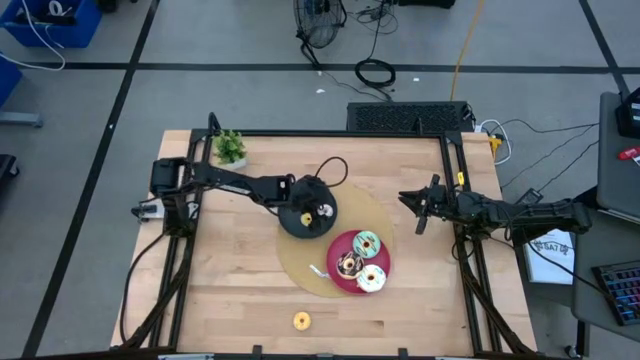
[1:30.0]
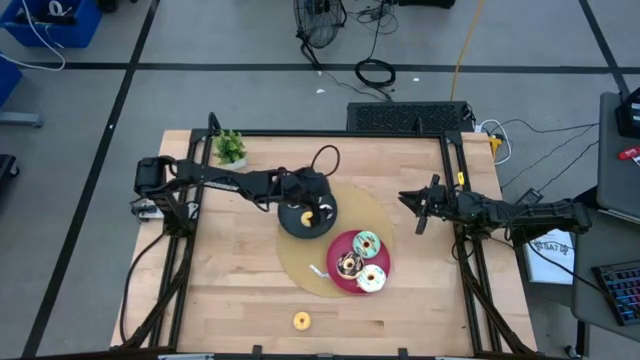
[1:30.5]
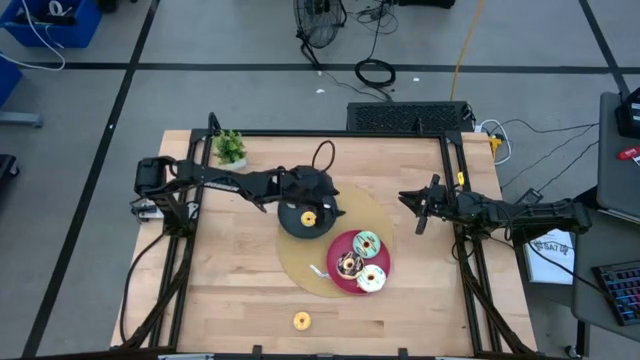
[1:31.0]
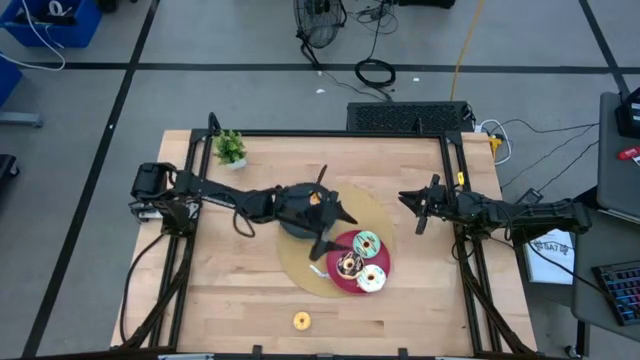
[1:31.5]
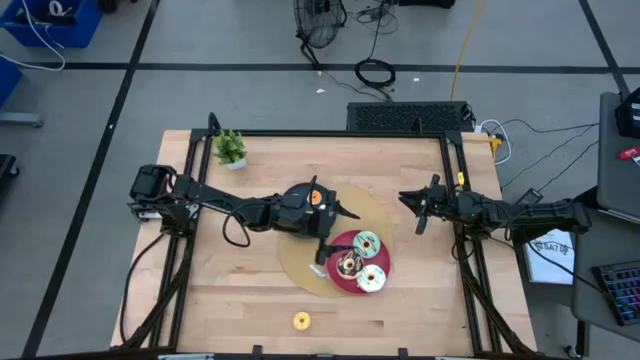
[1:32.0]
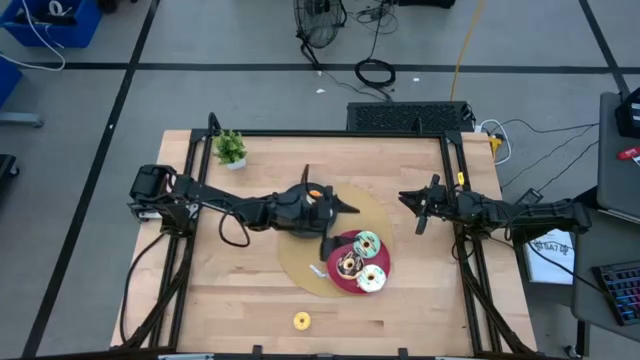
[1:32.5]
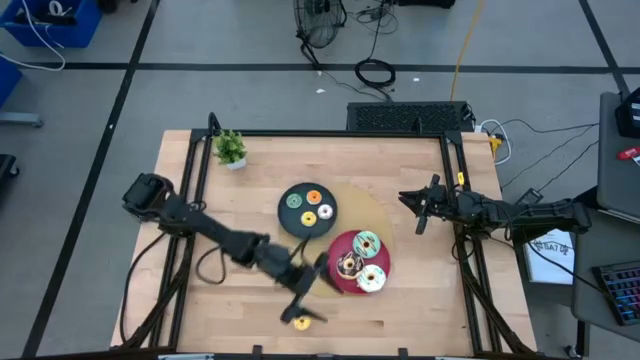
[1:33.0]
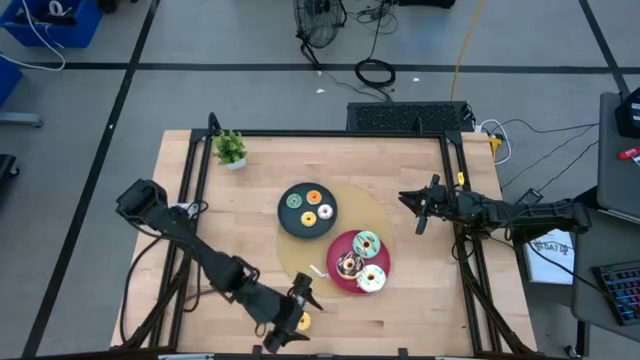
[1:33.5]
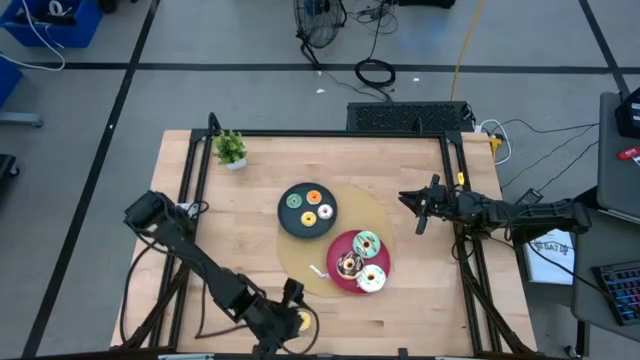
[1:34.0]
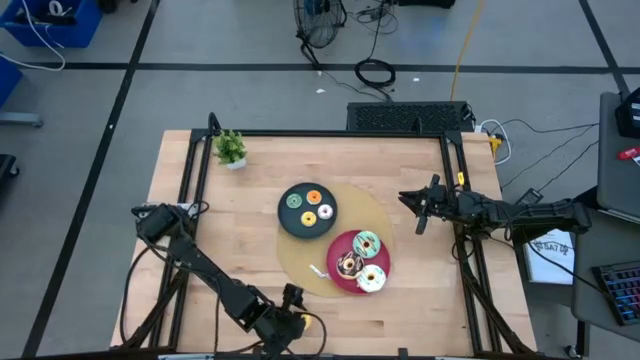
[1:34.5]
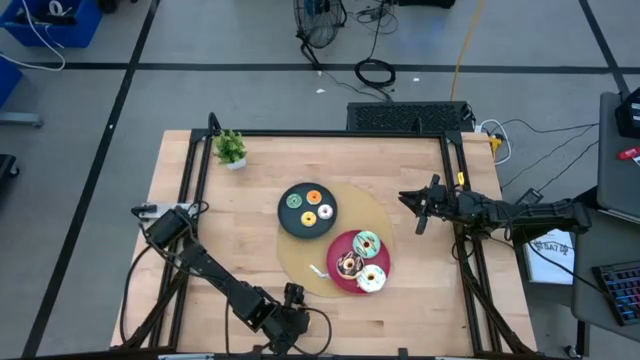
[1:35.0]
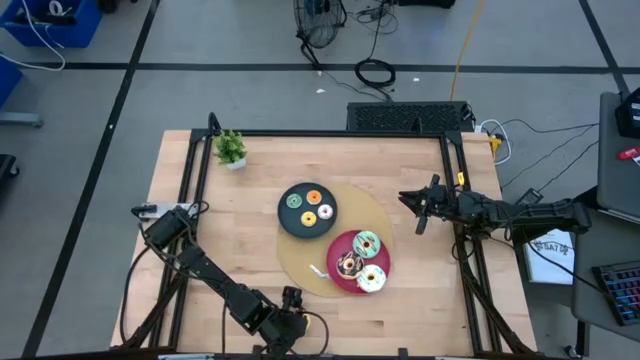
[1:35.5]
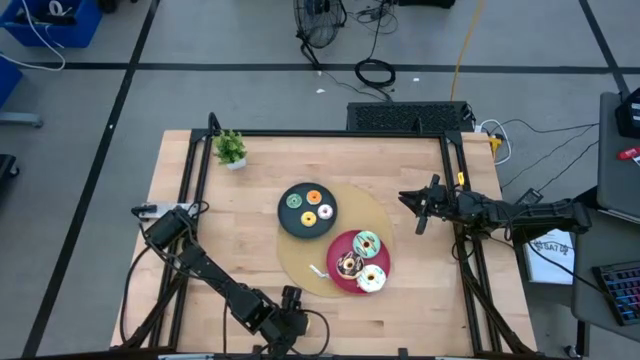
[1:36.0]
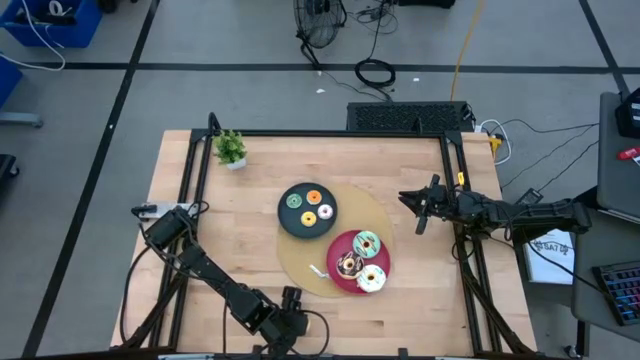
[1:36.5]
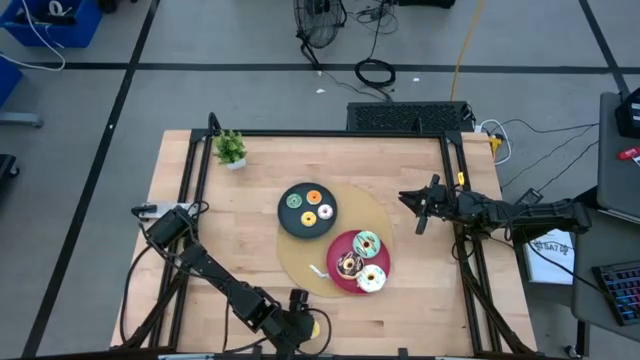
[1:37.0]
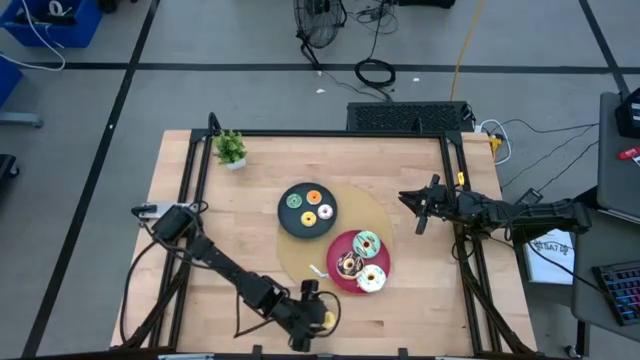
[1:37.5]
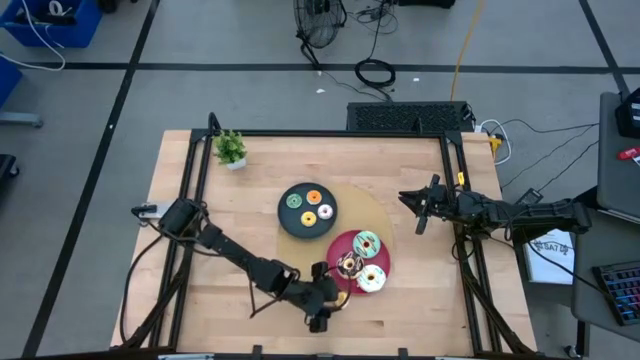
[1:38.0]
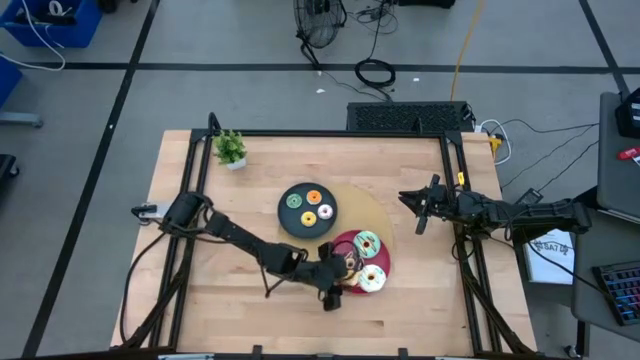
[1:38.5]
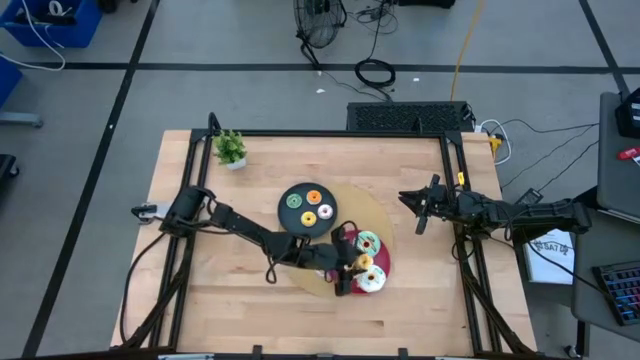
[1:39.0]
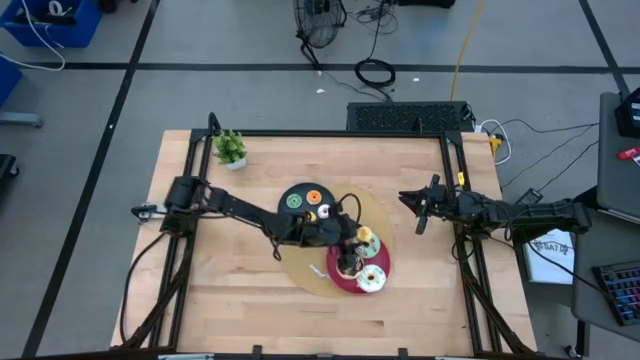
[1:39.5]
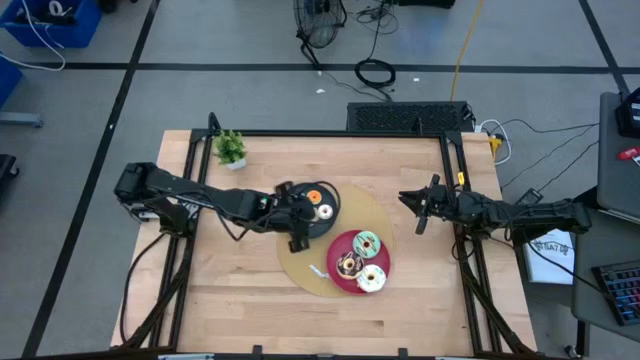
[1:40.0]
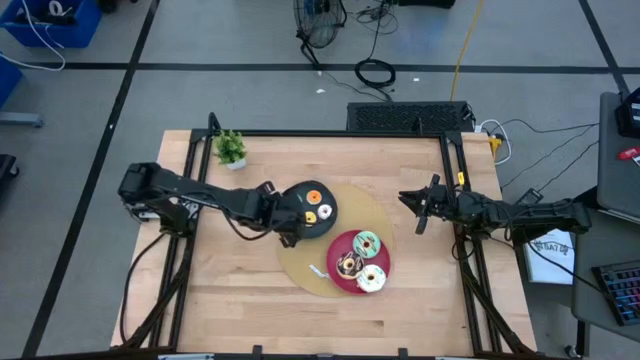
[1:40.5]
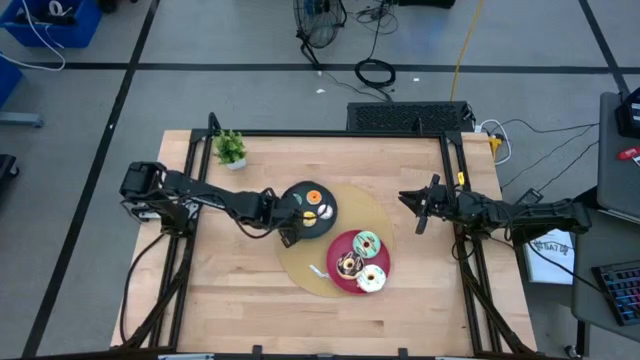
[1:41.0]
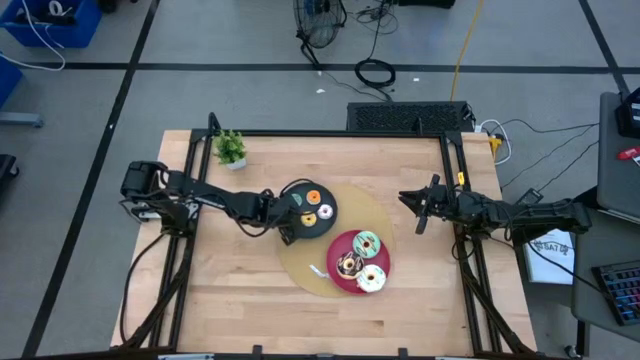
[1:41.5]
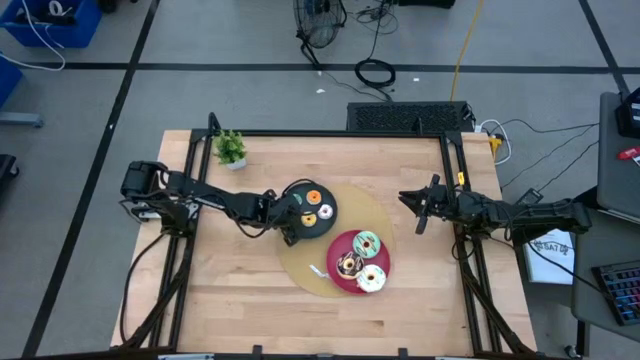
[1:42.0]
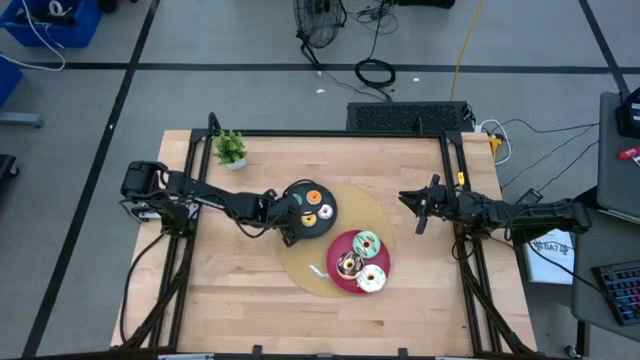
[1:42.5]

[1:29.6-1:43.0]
Task: Pick & Place donuts
Put the small yellow doughnut on the blue plate

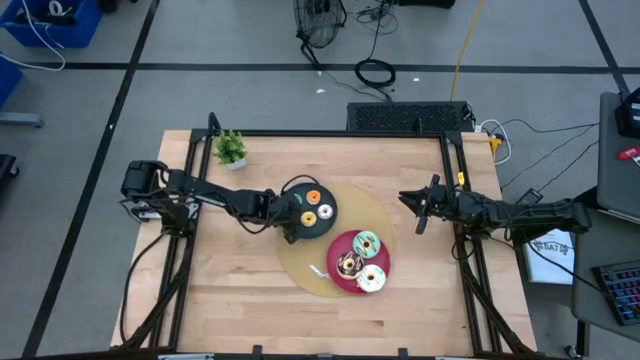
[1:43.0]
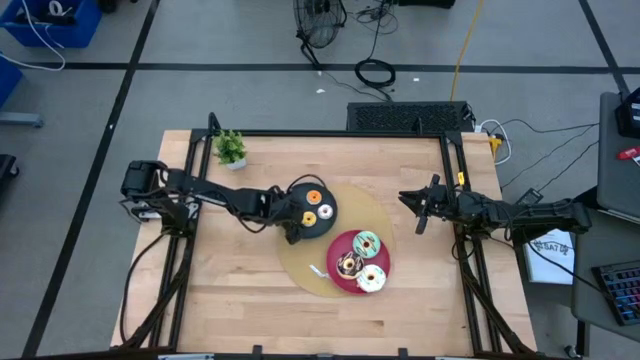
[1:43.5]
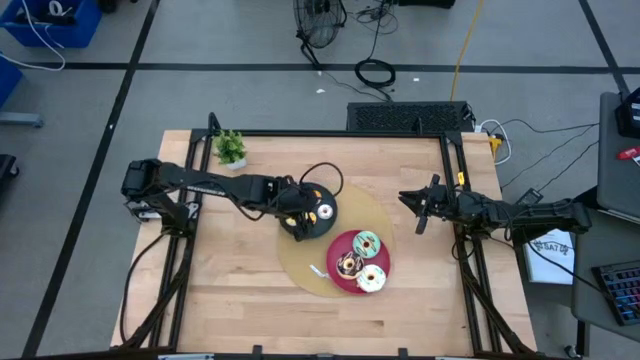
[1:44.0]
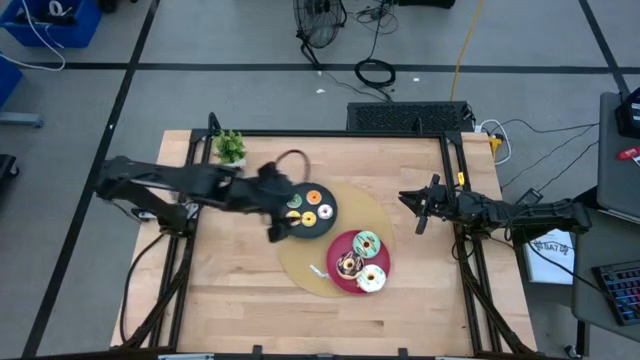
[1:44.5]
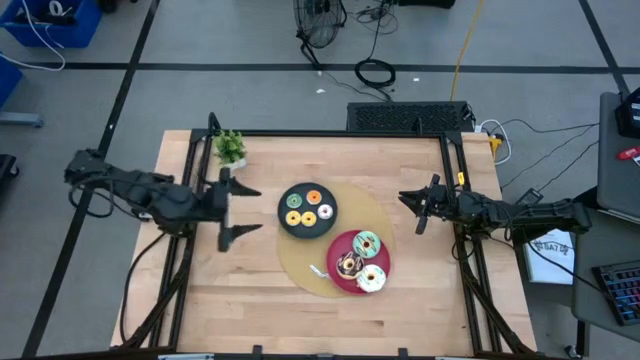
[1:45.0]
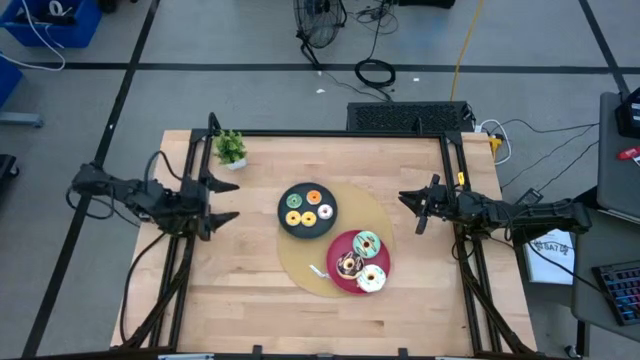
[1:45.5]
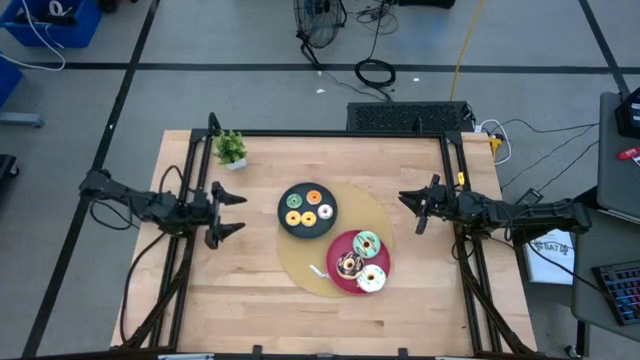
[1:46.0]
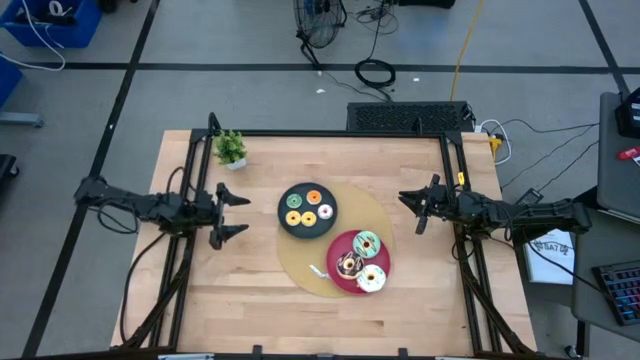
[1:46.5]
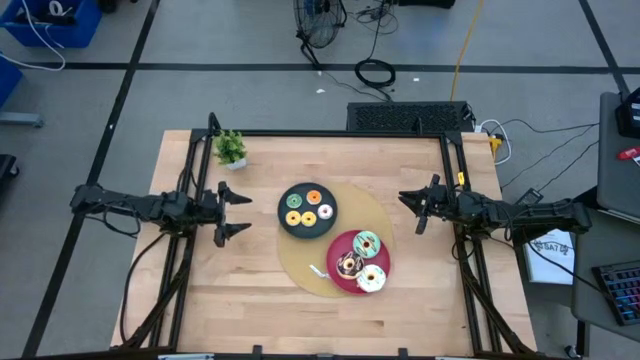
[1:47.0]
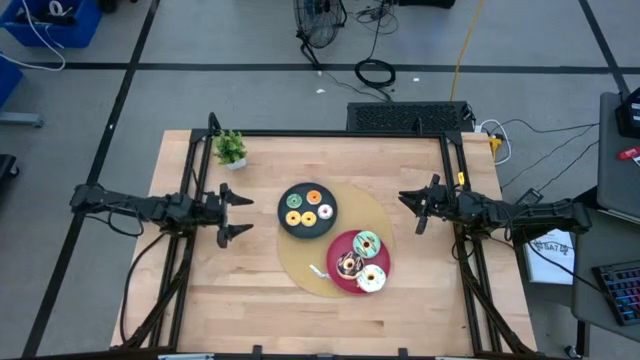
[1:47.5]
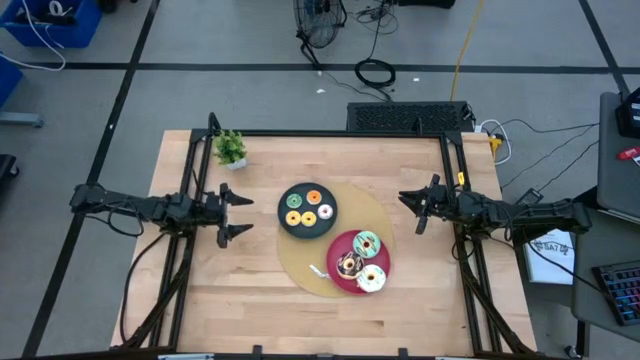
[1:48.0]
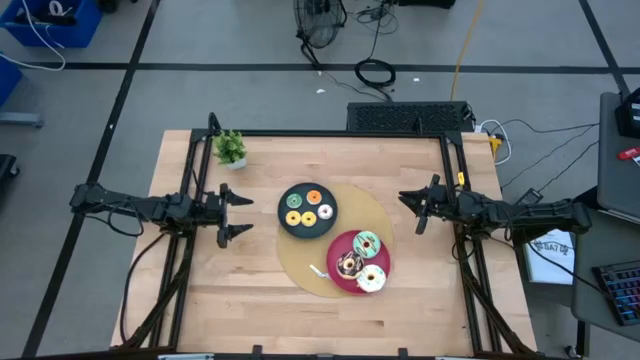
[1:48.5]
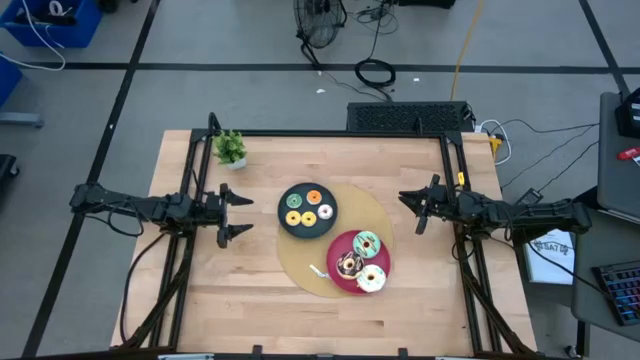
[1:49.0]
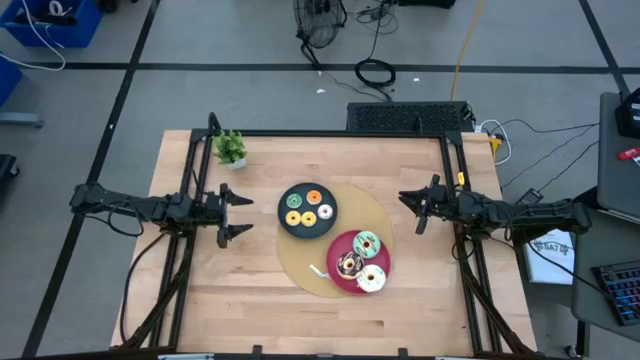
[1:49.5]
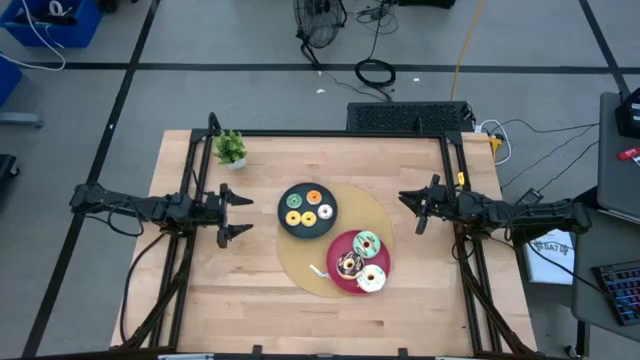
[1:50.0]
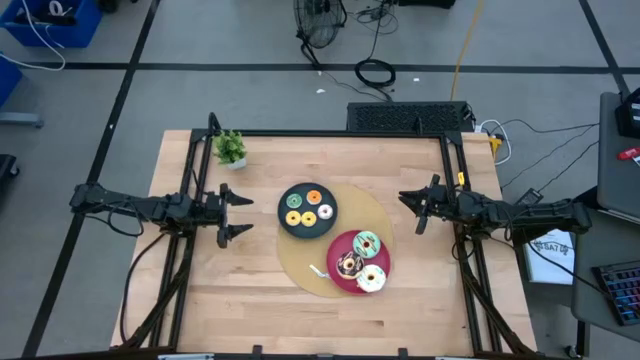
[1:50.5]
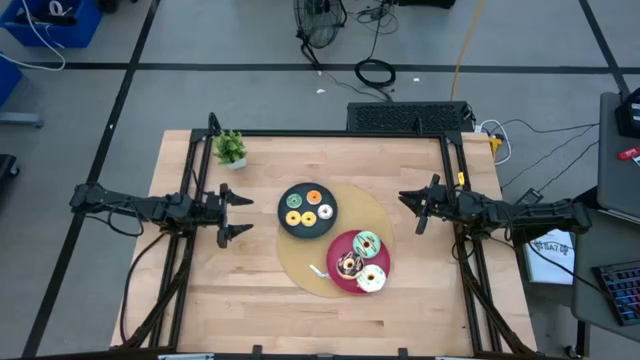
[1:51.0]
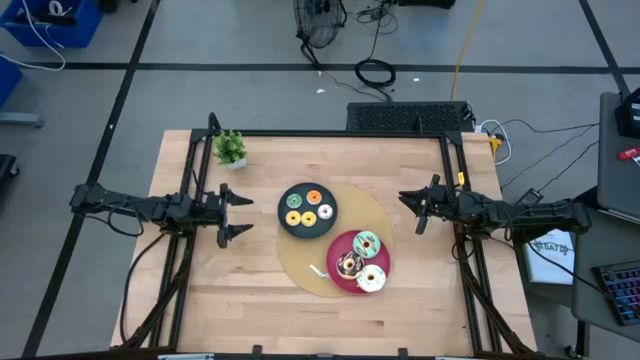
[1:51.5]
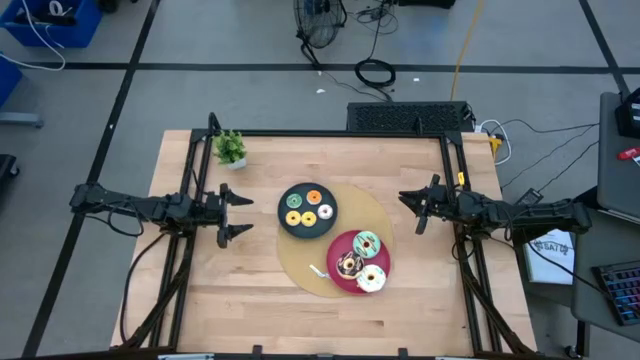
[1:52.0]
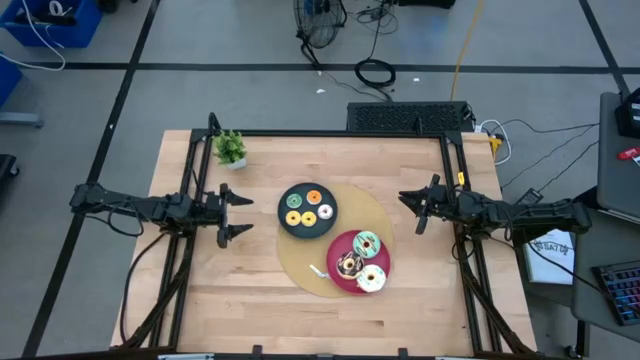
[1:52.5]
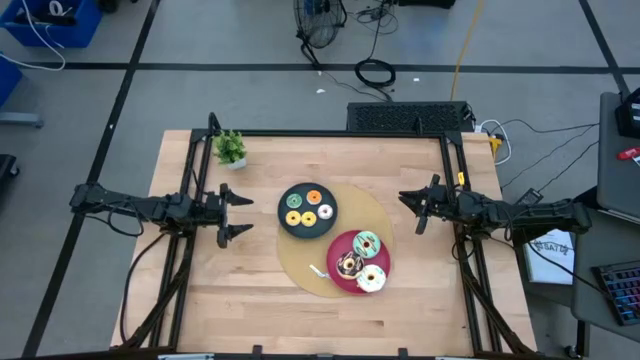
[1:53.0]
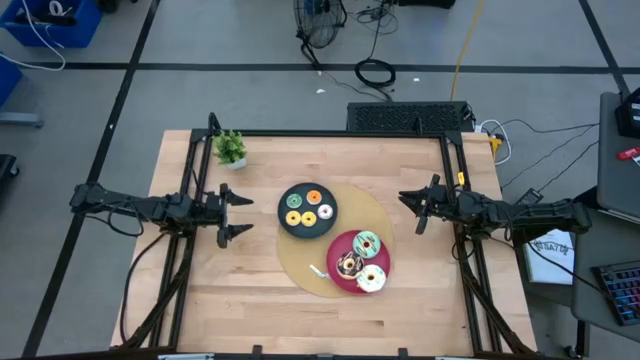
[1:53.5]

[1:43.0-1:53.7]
Return to Home Position
